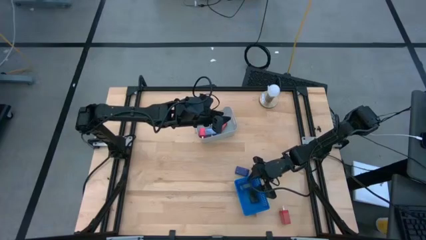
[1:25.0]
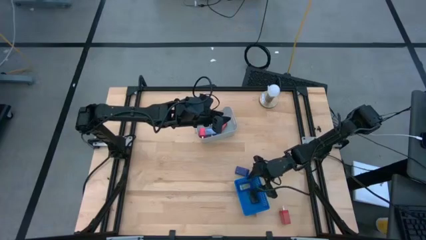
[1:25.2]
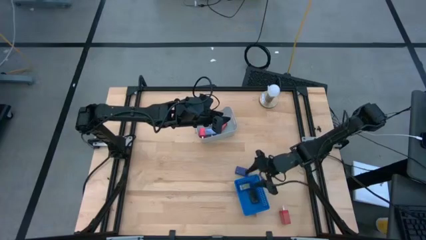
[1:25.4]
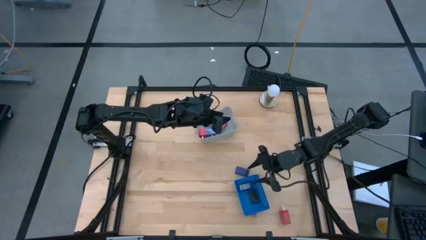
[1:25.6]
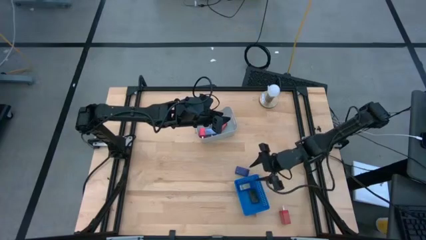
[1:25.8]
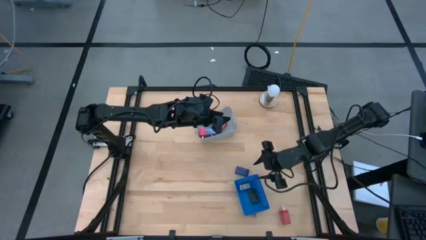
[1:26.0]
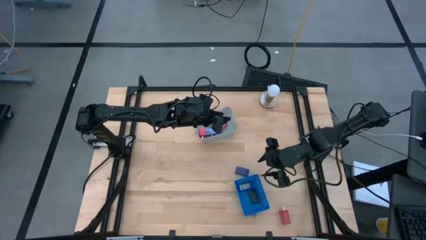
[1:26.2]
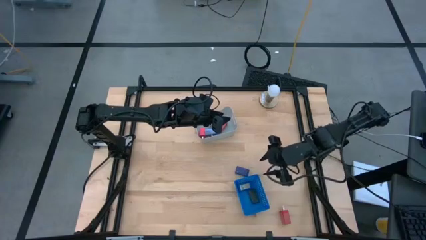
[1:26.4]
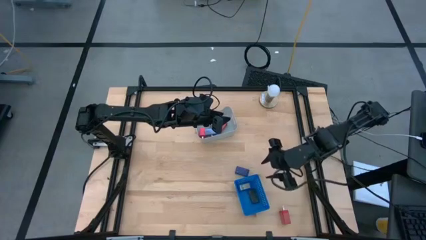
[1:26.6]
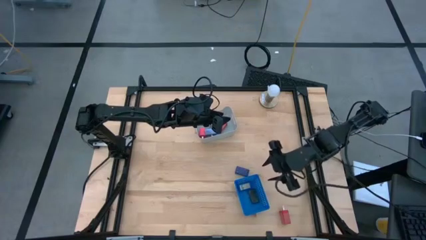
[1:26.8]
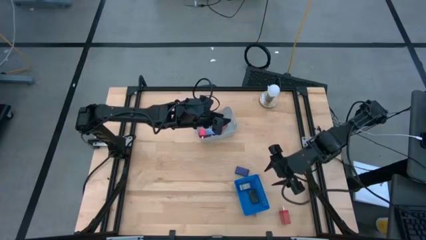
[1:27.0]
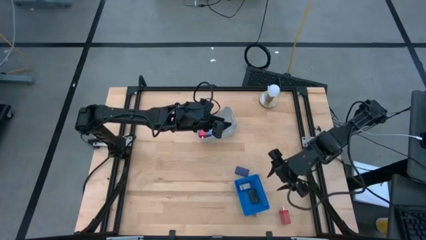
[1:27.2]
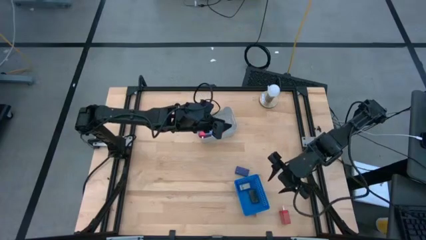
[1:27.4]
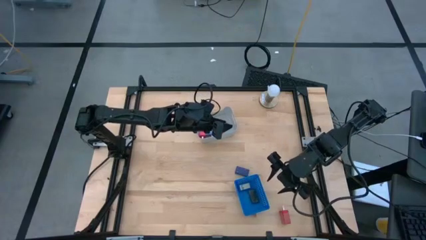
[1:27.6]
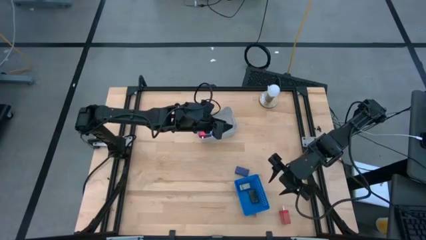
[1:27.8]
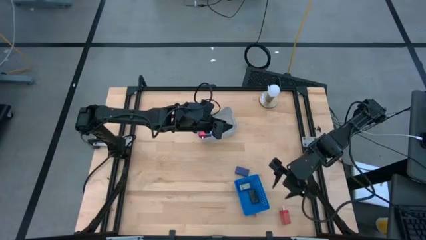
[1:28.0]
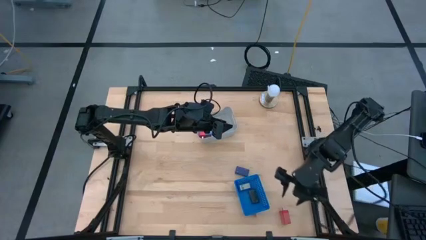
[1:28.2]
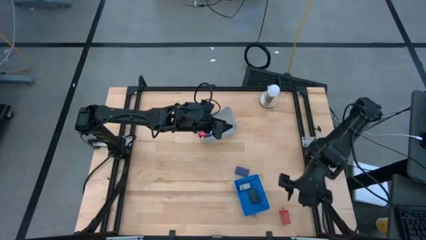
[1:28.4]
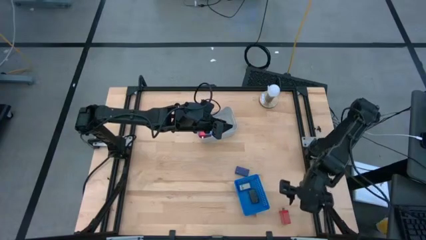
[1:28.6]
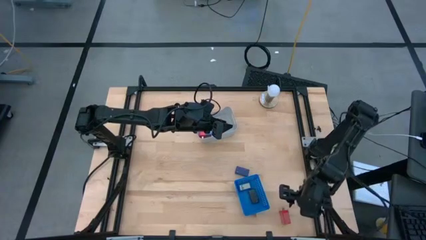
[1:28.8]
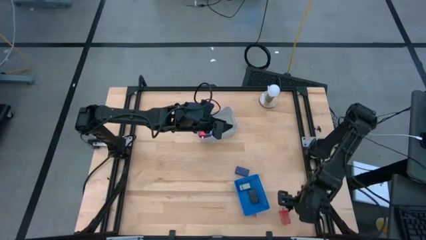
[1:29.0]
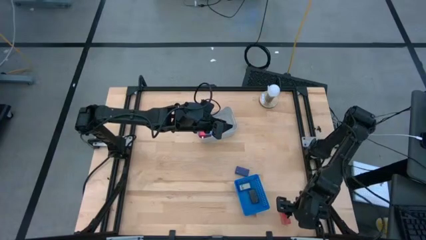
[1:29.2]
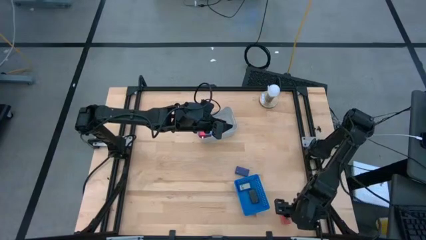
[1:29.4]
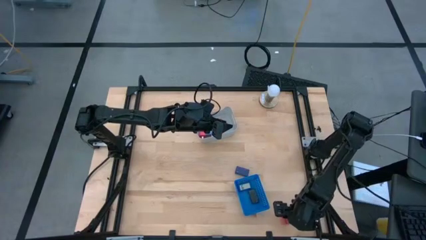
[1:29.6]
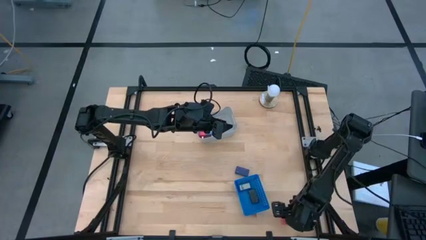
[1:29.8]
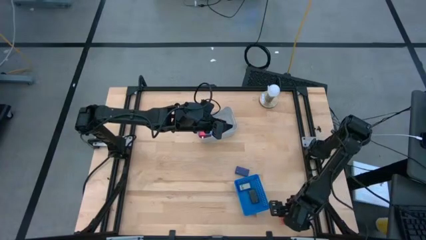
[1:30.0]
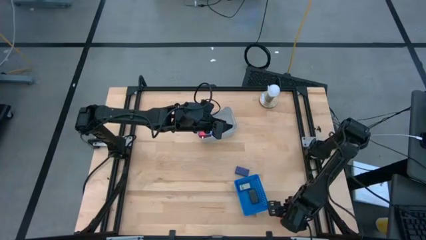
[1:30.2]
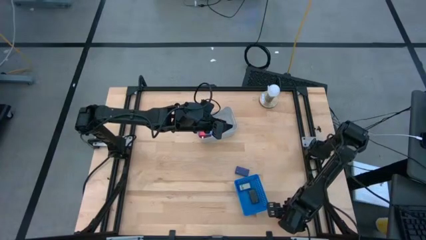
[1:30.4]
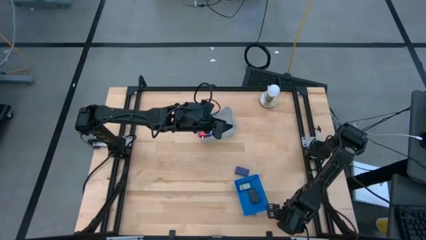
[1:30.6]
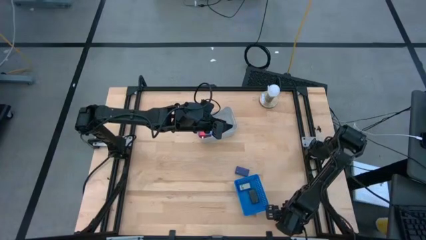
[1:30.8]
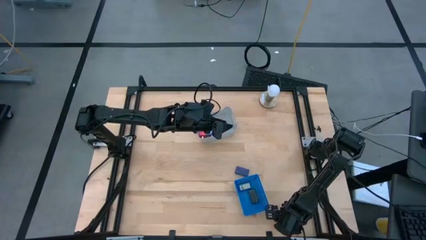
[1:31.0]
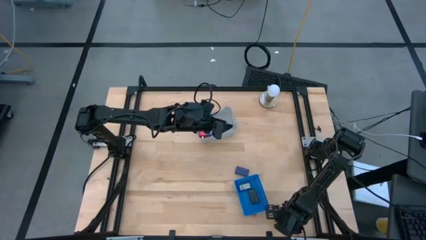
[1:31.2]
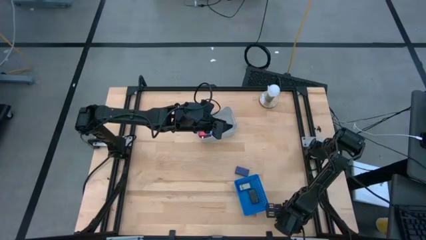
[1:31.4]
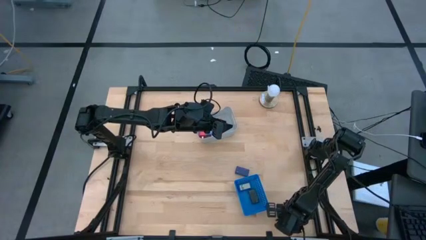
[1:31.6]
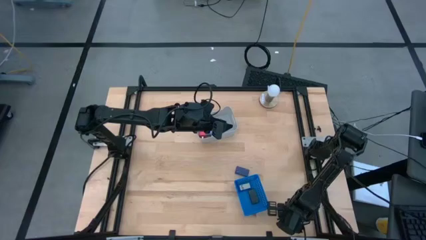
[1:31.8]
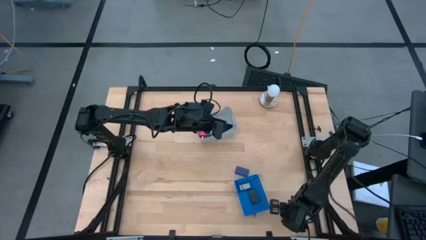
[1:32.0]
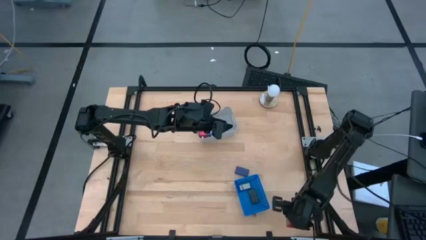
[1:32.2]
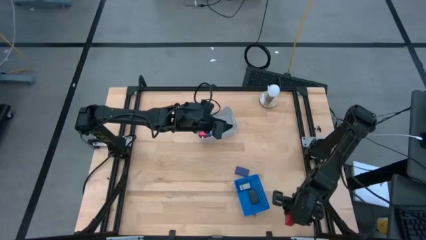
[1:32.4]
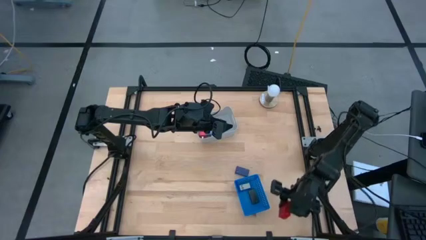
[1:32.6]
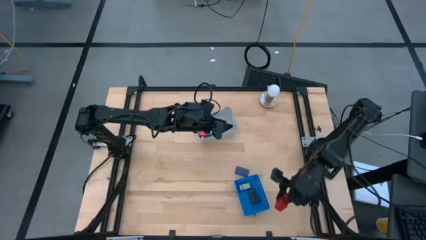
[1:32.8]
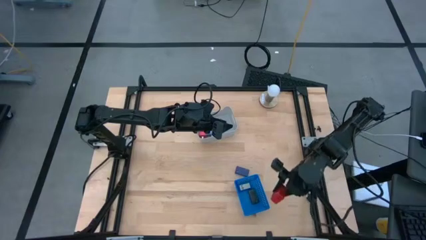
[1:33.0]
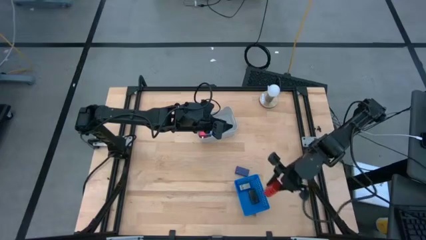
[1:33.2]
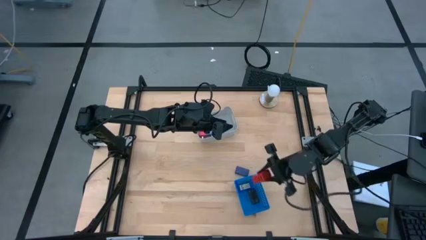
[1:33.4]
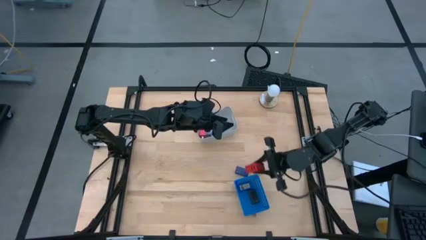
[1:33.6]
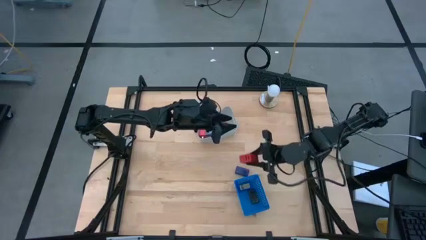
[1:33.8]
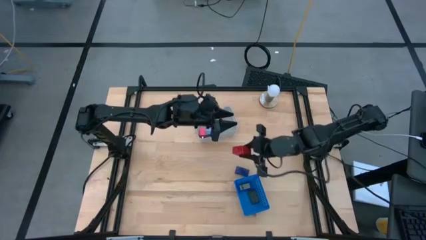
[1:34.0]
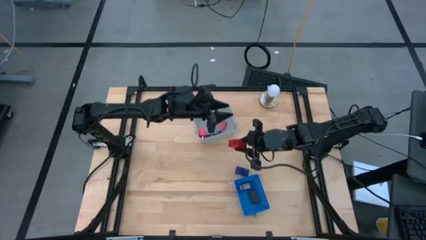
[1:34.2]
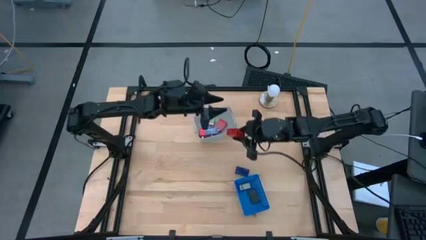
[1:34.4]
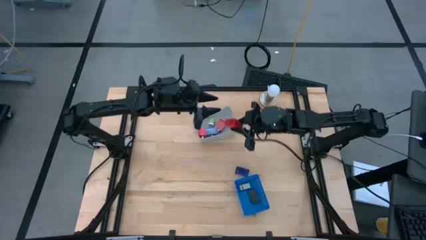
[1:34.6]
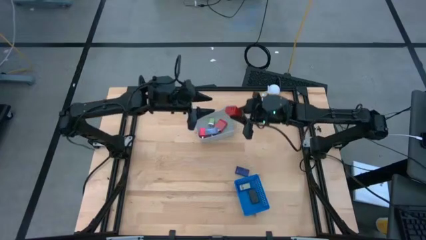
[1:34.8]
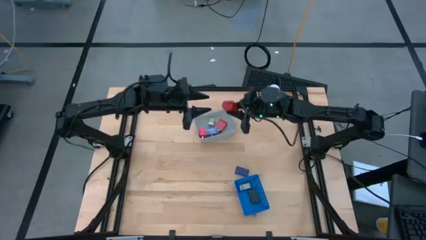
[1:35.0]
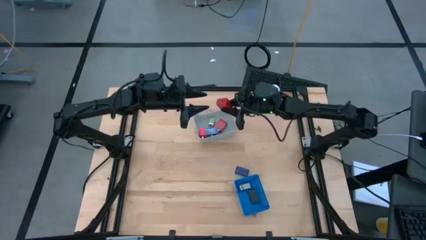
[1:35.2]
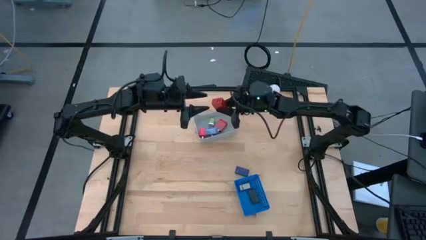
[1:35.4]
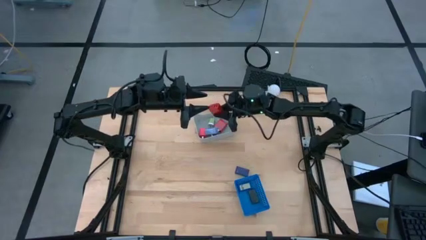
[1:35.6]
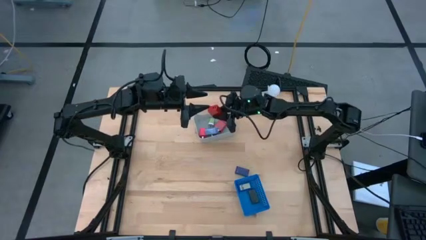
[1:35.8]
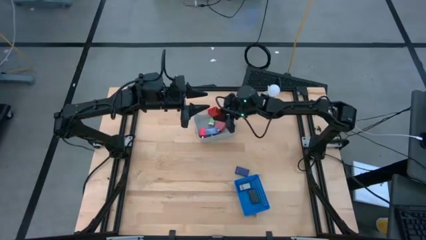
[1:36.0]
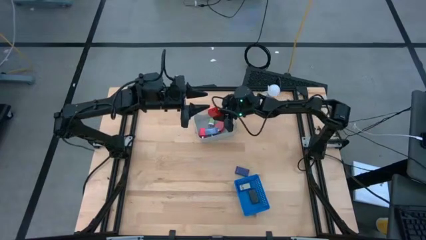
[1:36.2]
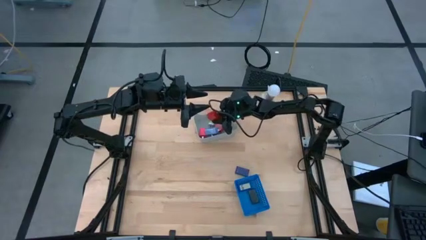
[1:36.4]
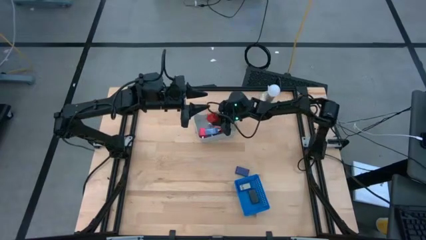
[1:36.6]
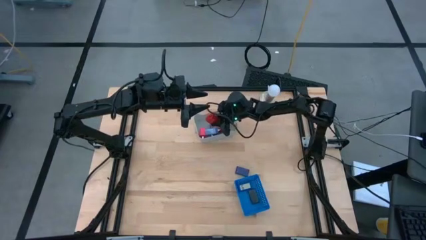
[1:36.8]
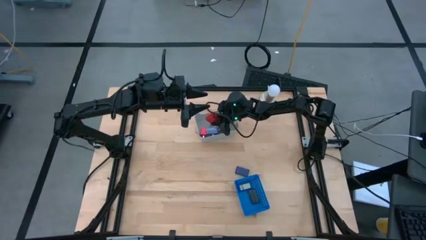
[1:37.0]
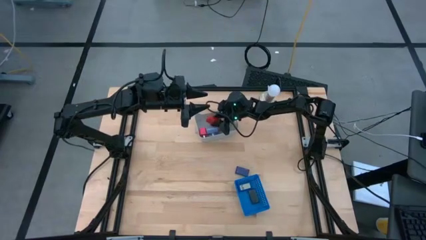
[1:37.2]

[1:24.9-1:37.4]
Task: Pick & Place Office items
Put the red charger adapter into the gray bin

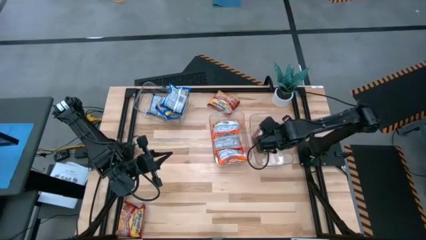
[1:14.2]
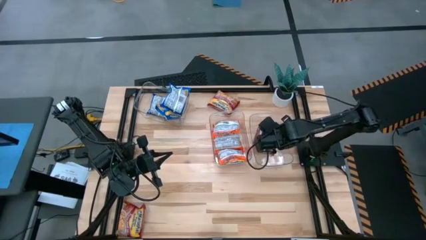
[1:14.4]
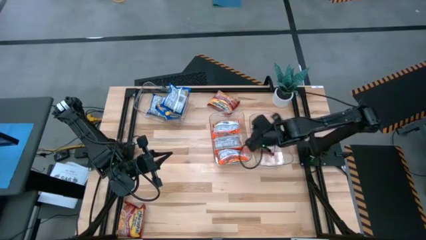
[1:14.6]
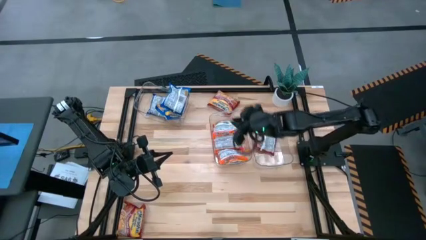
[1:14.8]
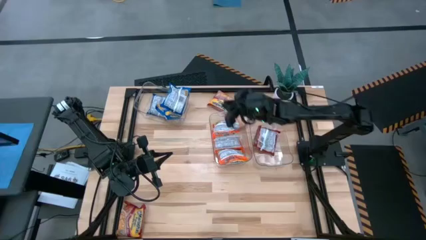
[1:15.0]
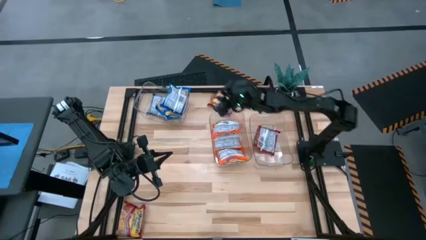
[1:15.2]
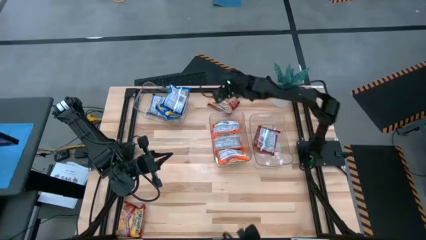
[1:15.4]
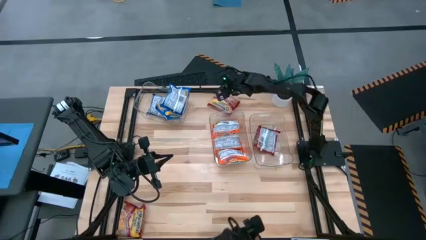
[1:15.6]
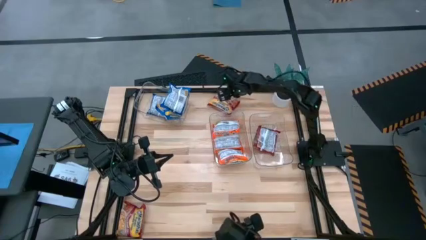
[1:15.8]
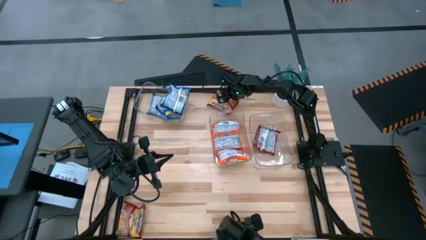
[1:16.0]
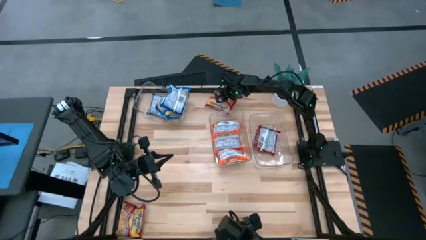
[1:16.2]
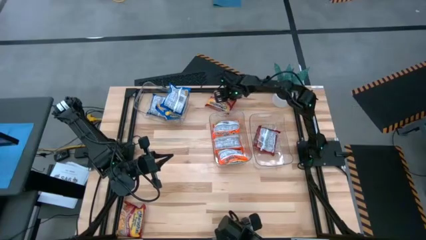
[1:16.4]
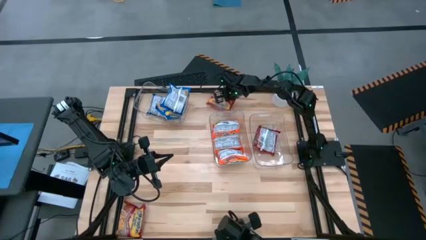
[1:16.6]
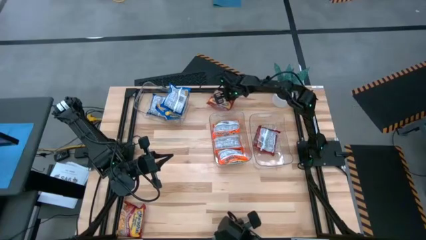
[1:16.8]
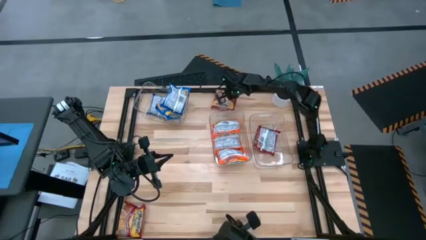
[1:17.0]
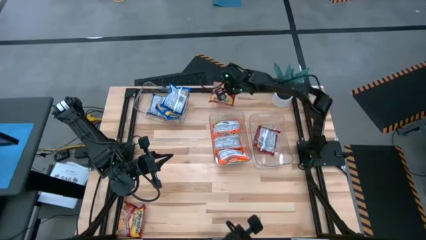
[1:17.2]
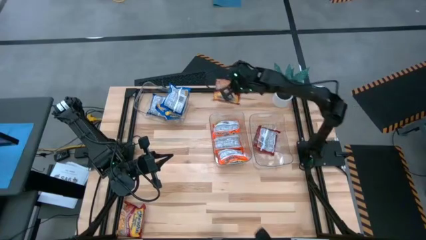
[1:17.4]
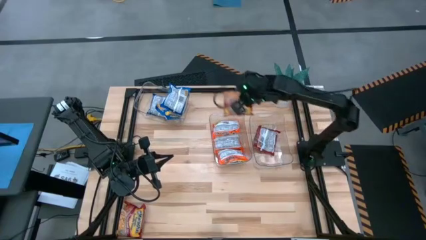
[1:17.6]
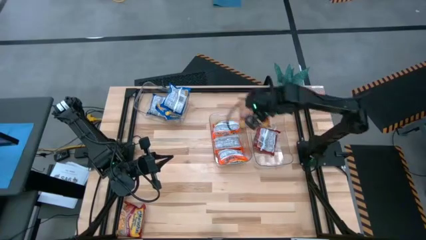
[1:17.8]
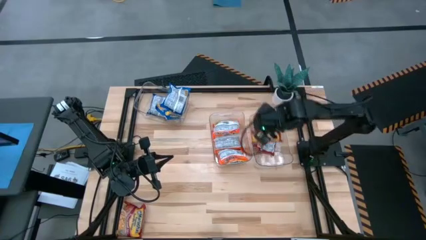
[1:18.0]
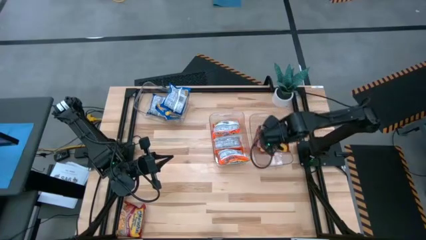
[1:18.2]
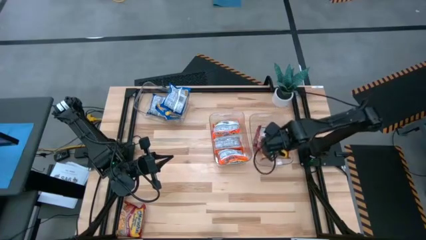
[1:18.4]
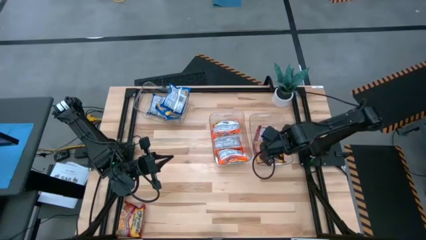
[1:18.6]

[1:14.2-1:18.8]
Task: Sort Maruchan noodles
Put the top red noodle pack into the bottom right transparent bin
